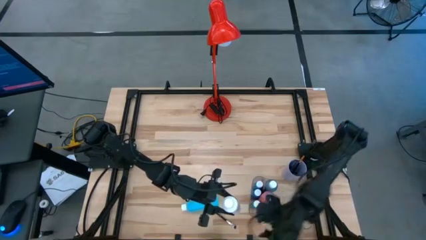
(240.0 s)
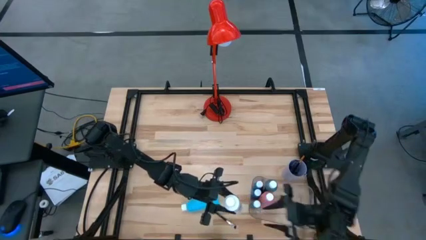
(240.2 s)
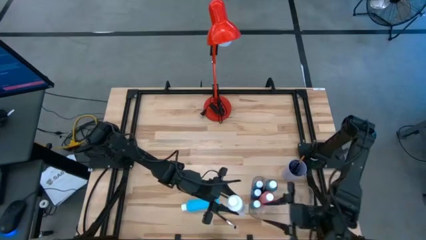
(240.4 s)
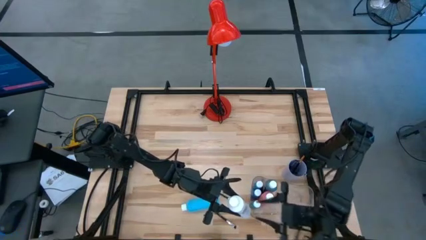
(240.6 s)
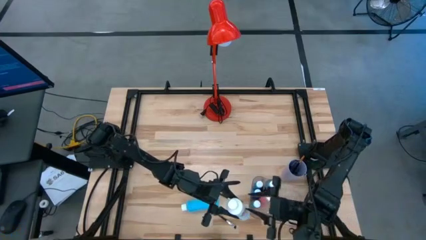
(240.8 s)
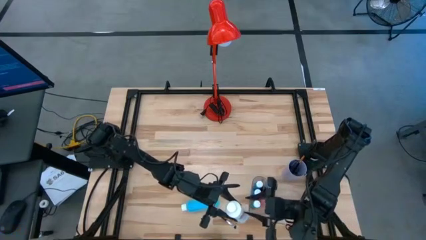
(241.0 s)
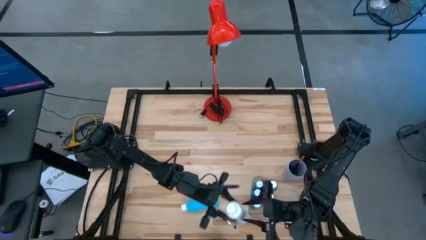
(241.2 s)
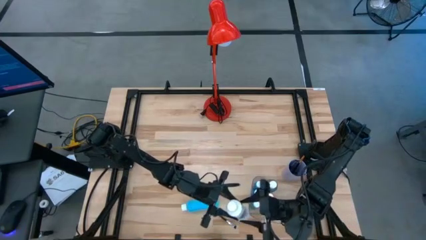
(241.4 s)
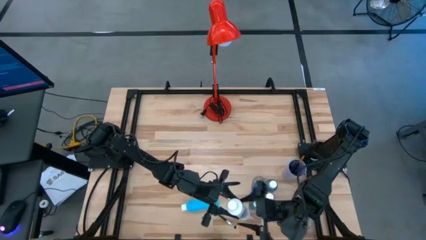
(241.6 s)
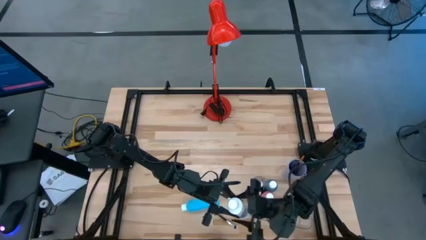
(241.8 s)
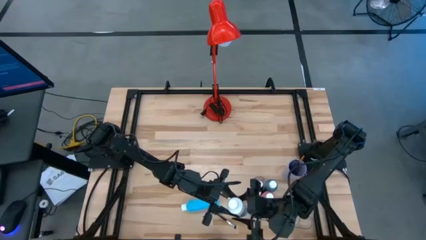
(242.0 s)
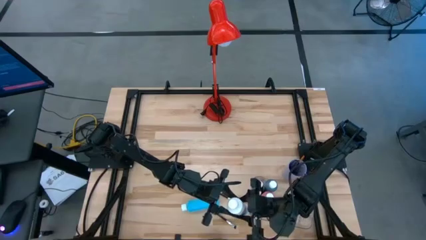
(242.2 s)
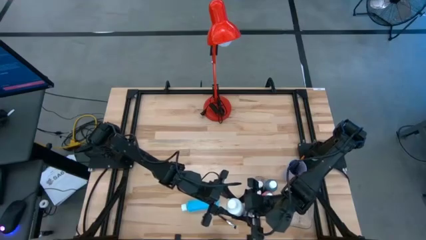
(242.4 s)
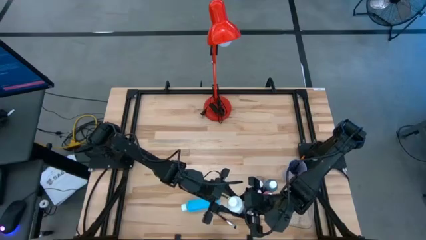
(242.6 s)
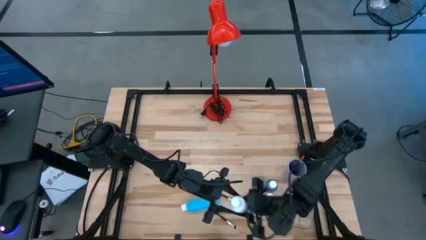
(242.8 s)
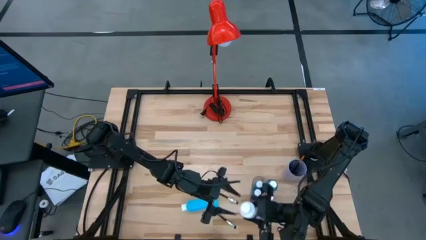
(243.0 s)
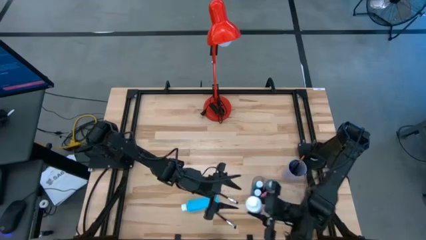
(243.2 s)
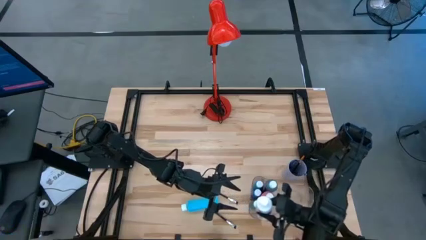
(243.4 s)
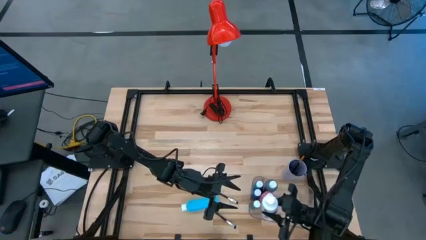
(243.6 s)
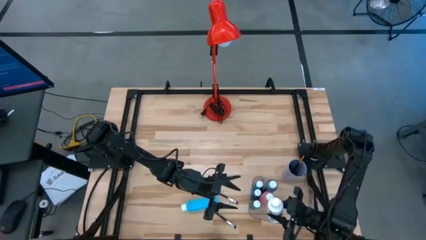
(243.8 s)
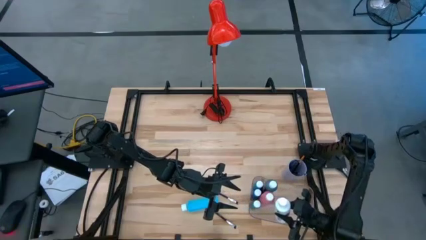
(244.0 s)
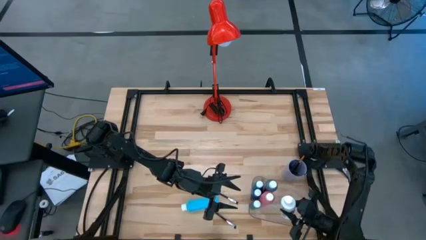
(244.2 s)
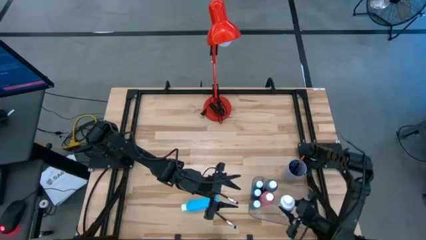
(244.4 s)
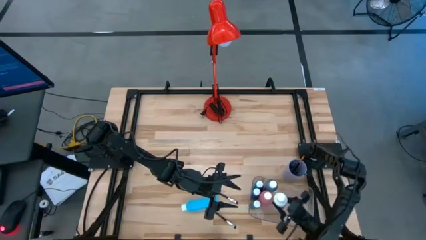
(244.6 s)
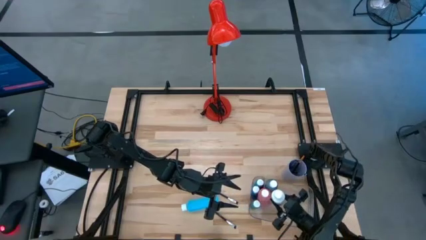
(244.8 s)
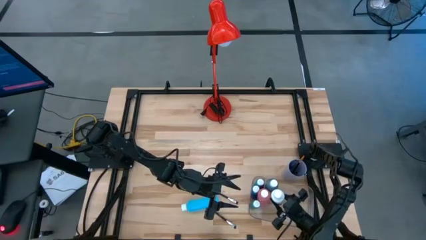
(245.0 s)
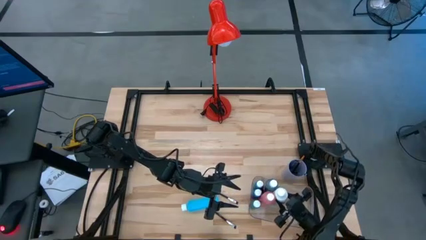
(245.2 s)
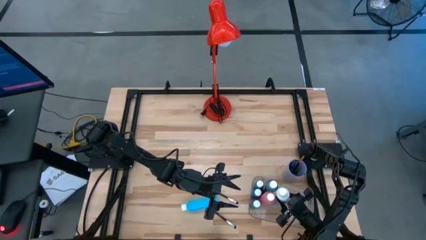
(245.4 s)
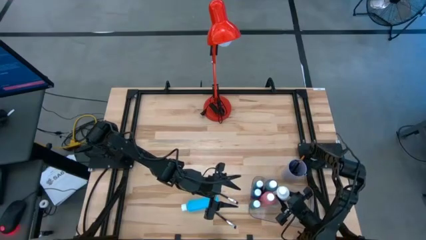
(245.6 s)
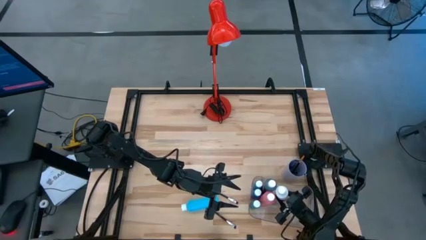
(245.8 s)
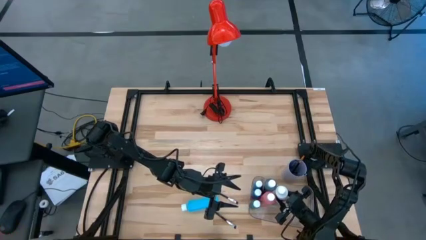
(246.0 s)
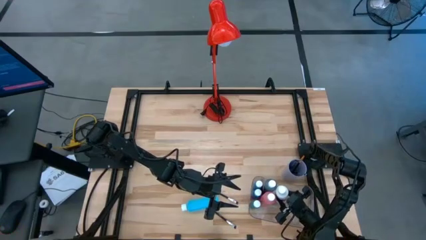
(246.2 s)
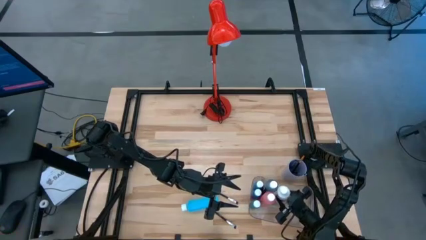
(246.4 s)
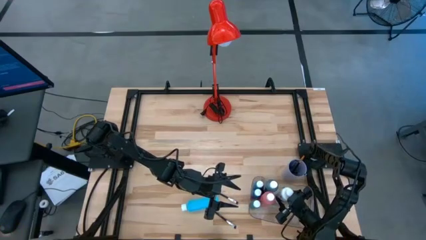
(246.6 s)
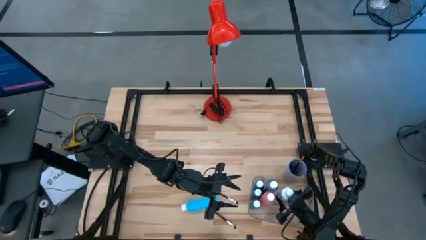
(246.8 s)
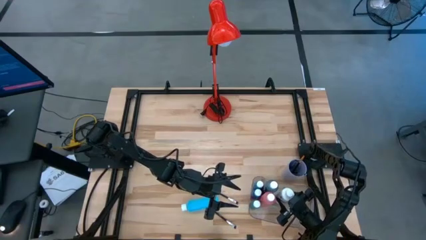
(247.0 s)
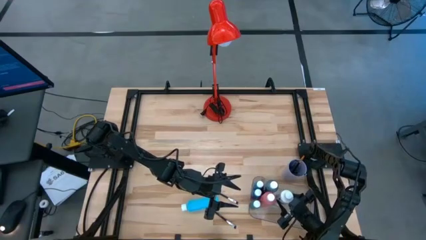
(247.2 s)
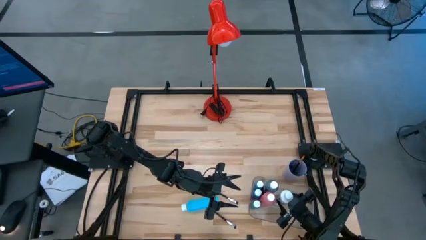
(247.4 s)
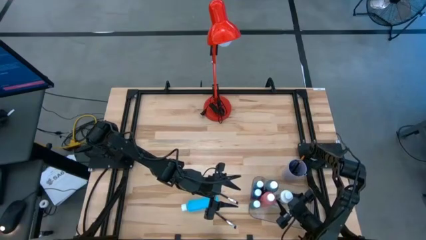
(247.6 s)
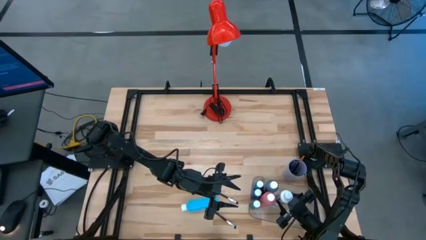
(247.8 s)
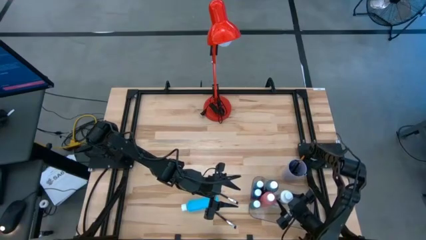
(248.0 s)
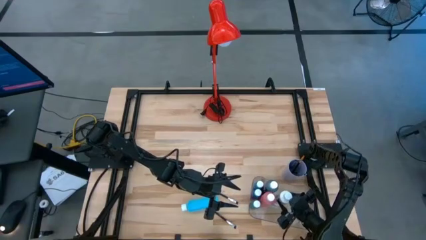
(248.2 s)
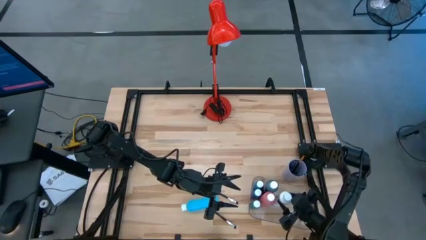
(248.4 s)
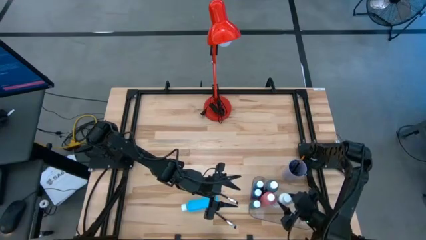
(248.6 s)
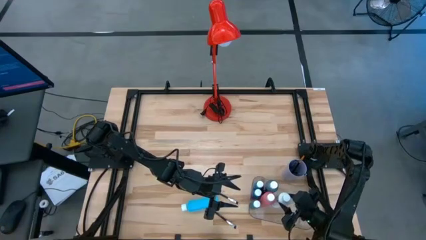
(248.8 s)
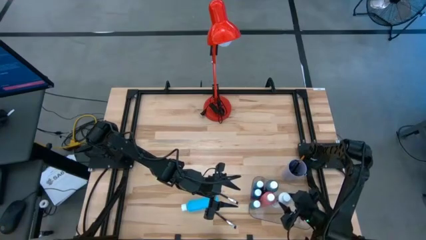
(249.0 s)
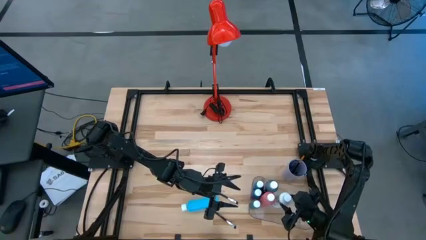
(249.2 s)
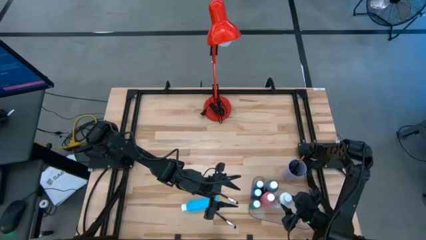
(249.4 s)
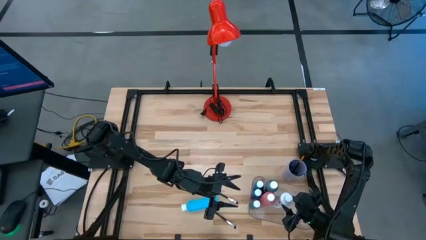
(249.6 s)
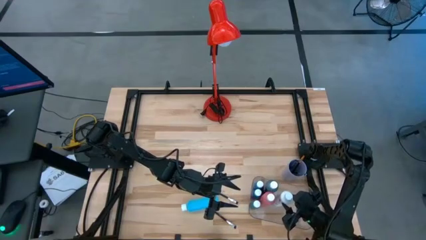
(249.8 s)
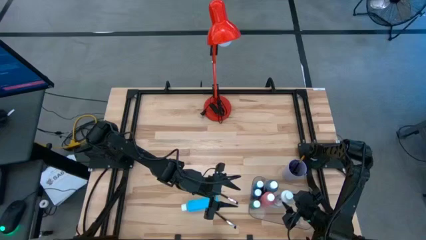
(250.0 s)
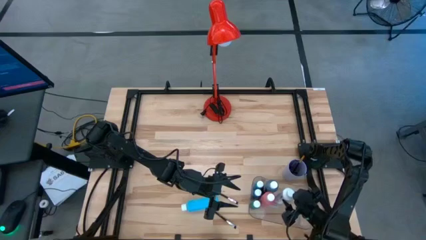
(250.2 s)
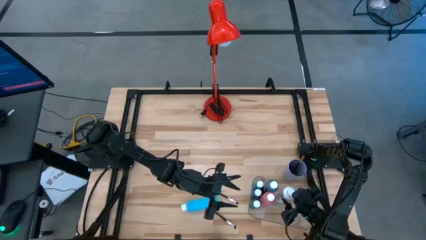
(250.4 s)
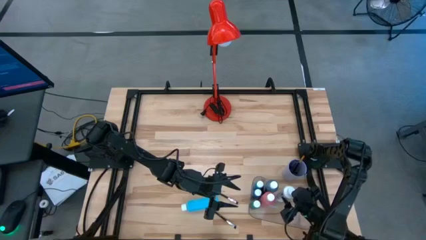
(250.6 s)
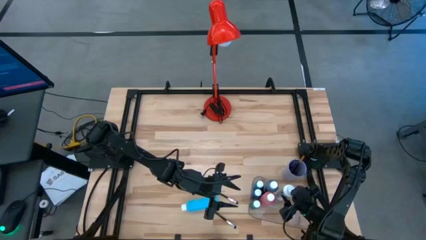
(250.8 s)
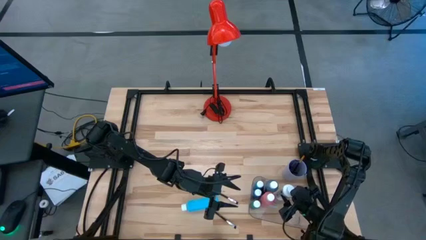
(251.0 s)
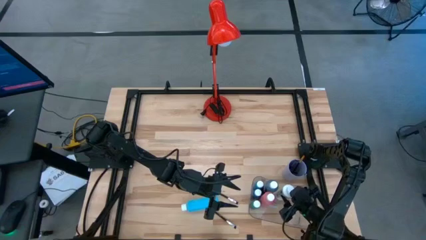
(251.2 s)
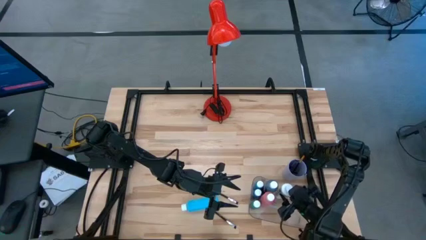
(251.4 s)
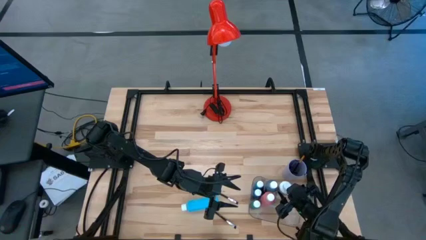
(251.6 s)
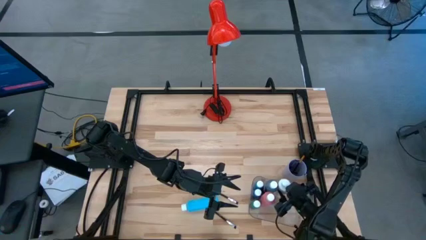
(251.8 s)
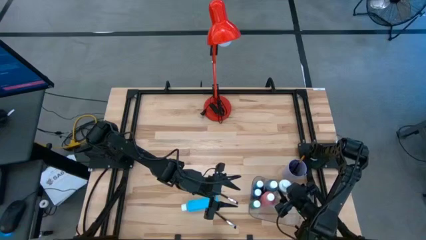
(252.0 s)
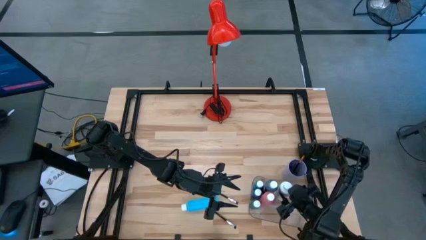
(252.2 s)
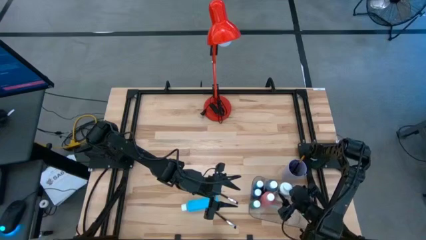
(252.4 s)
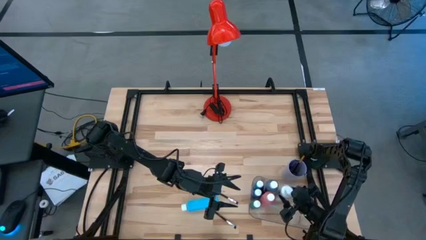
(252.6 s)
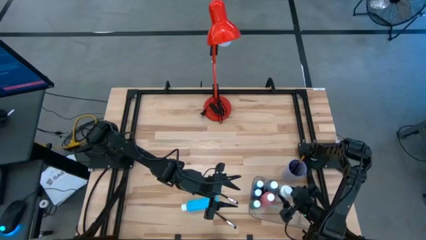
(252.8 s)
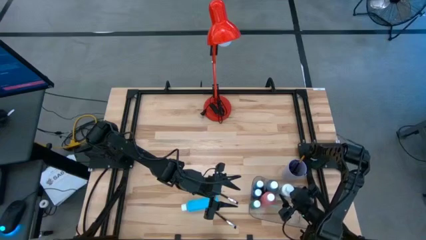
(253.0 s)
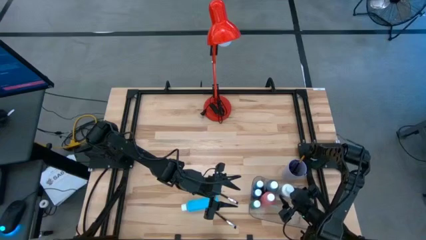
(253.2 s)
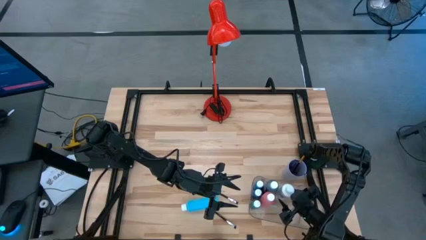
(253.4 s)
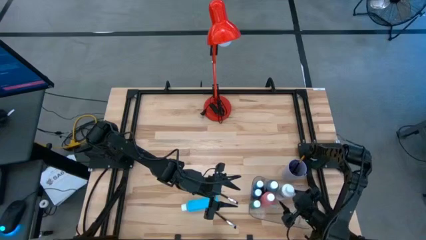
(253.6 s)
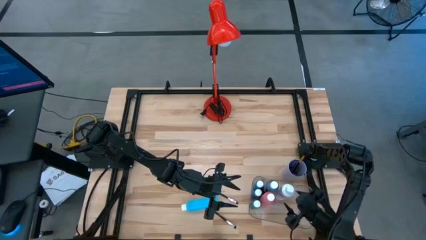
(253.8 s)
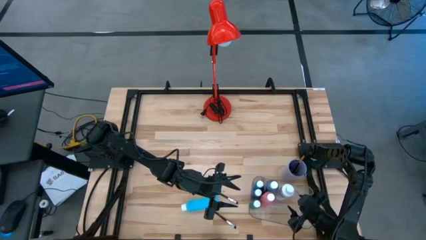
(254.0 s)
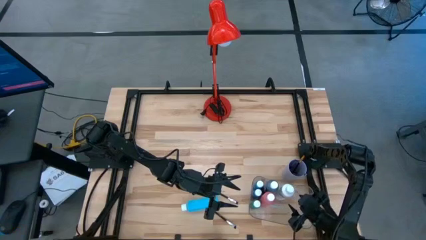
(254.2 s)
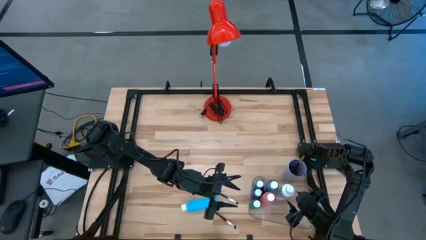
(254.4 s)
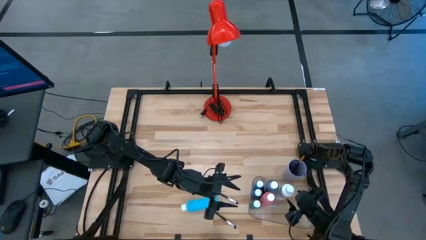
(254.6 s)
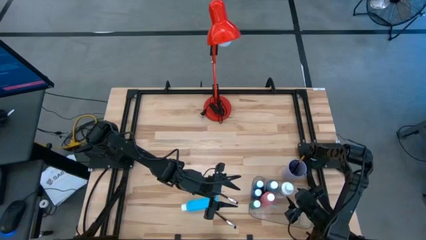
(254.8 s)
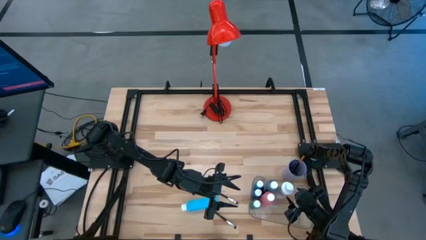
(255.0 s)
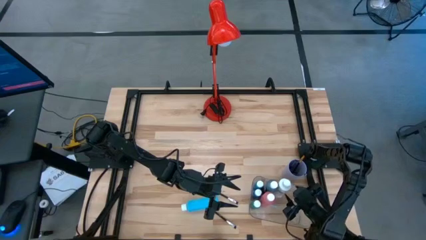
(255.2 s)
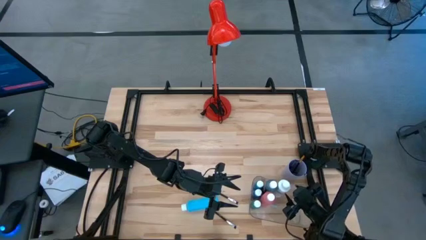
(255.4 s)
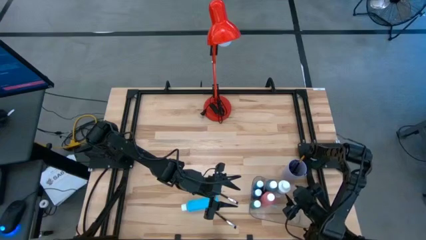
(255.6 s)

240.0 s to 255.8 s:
Task: Pick & Place Paint Supplies
Put the white paint bottle into the transparent bin
